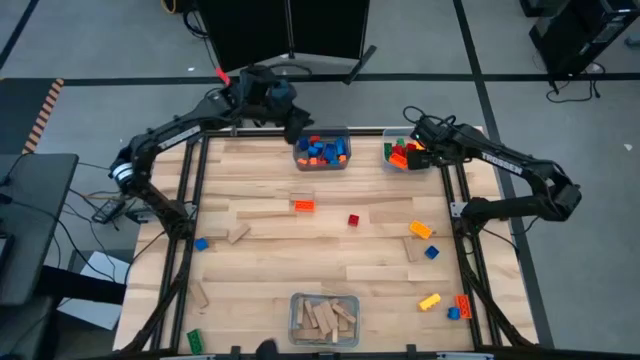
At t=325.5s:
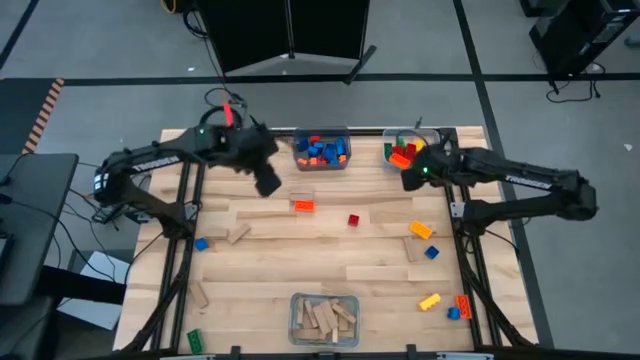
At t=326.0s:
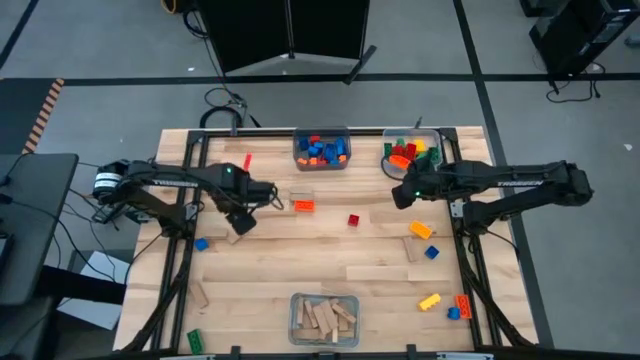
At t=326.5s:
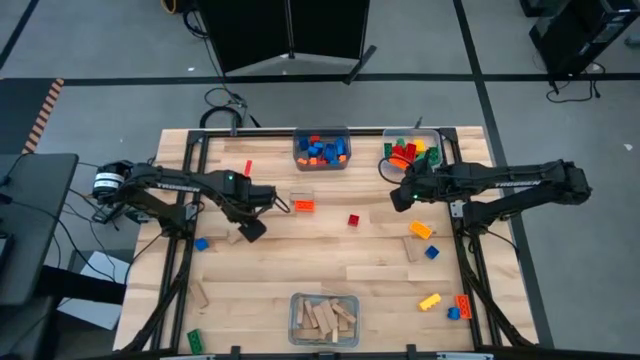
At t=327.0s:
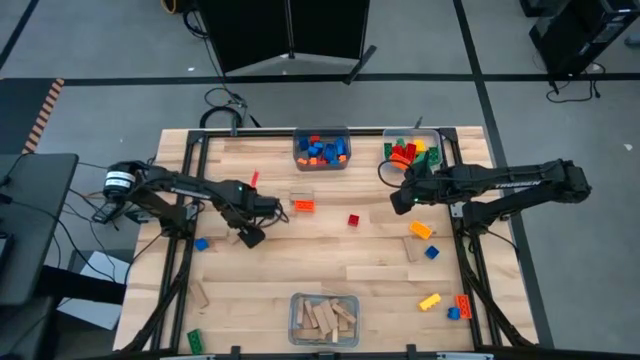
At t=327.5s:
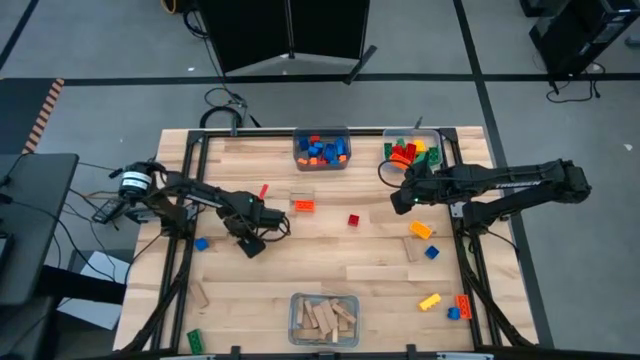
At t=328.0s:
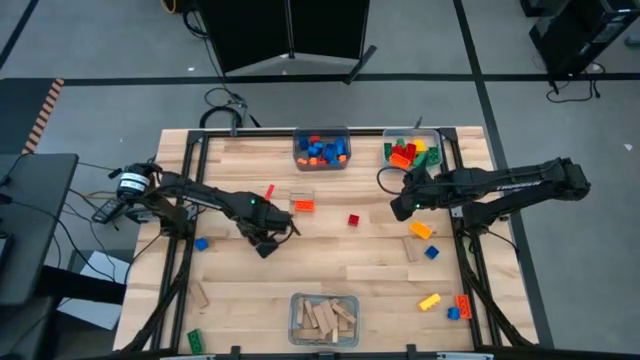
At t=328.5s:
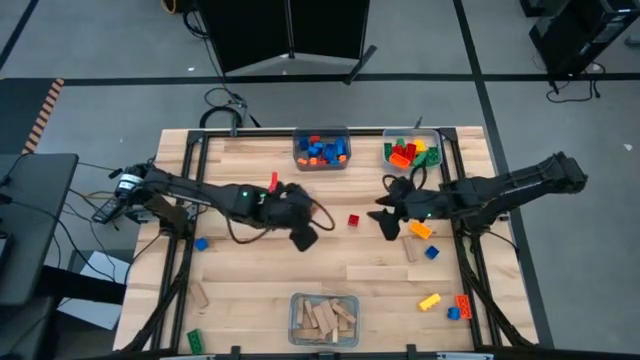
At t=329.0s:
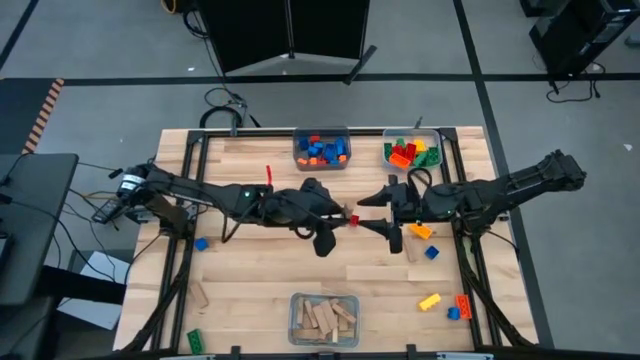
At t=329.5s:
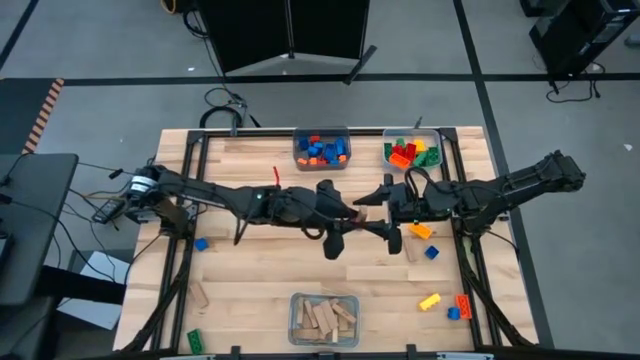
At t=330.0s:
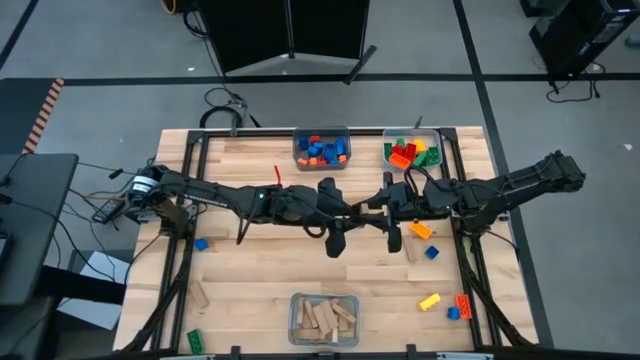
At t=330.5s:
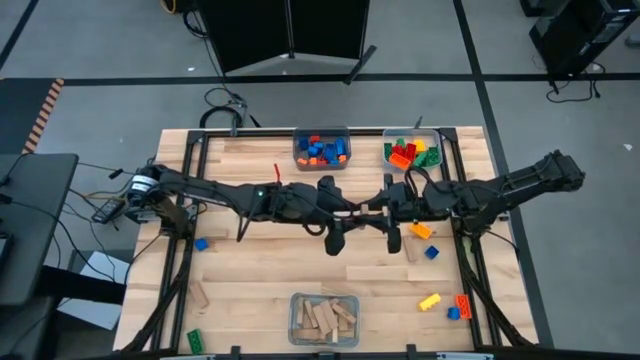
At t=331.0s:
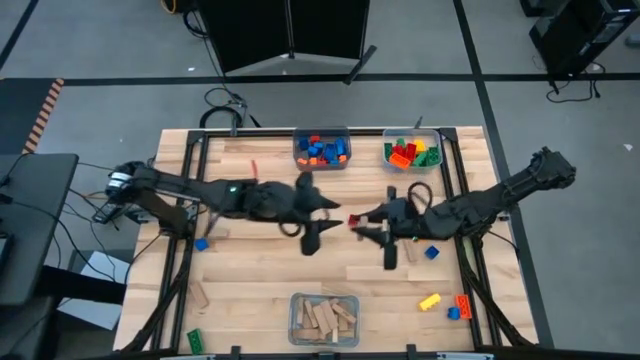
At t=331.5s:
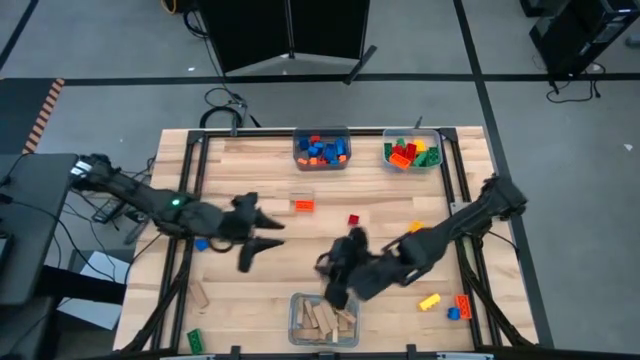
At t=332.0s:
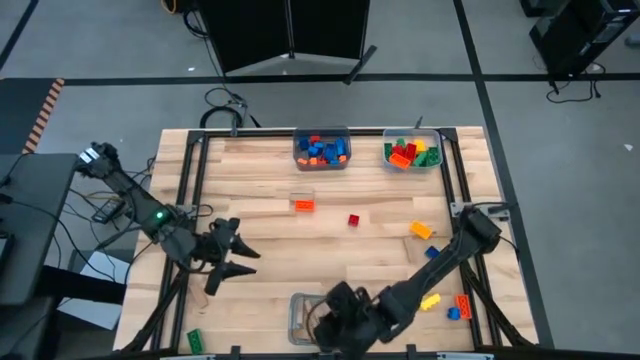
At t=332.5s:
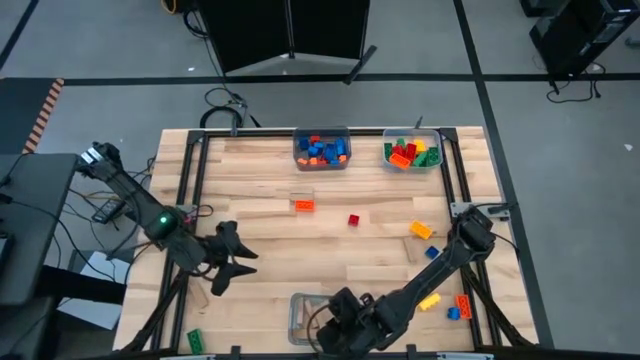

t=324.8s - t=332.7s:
Task: Sort blocks by size
Put the brown block into the gray bin

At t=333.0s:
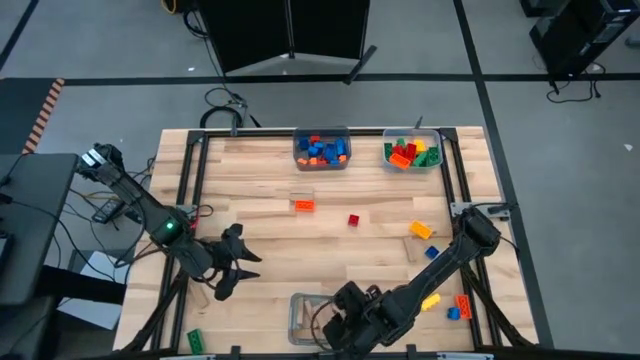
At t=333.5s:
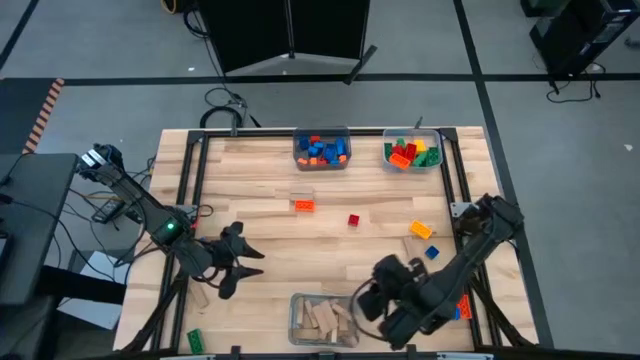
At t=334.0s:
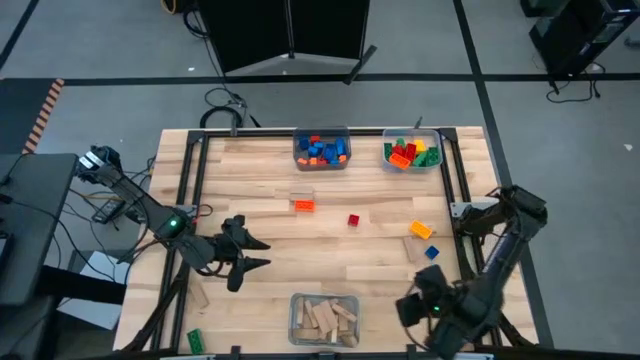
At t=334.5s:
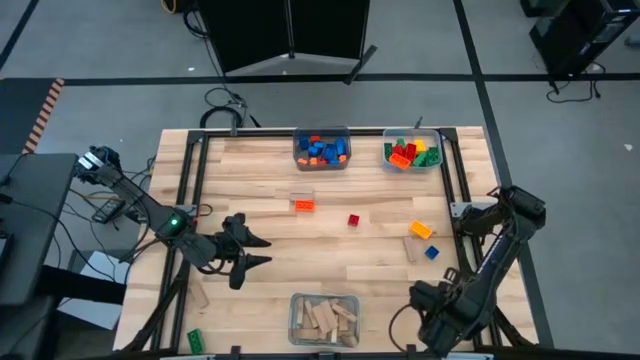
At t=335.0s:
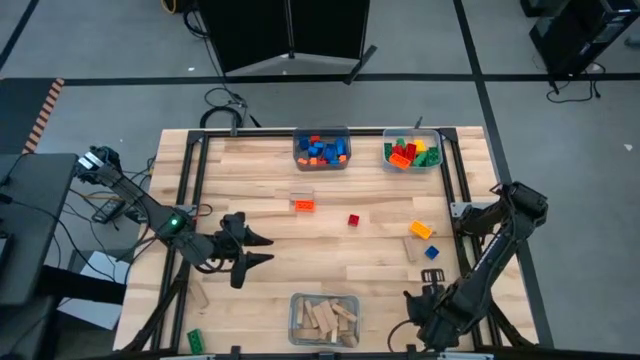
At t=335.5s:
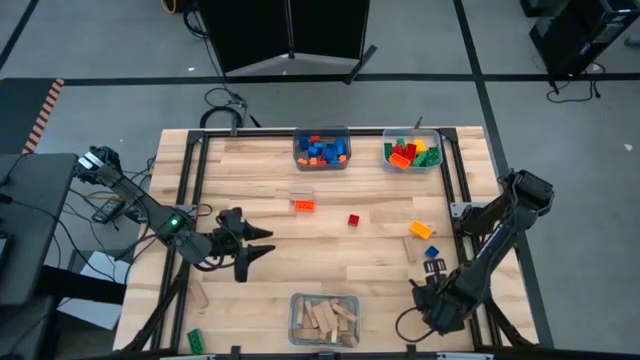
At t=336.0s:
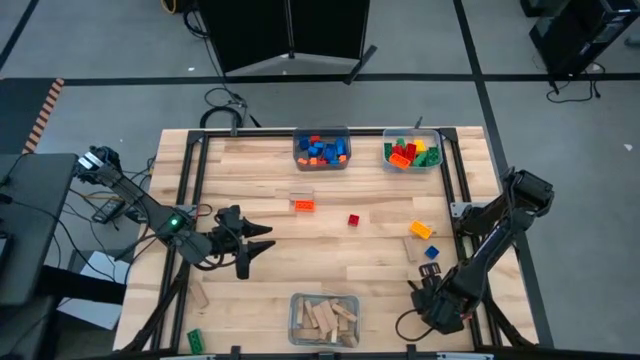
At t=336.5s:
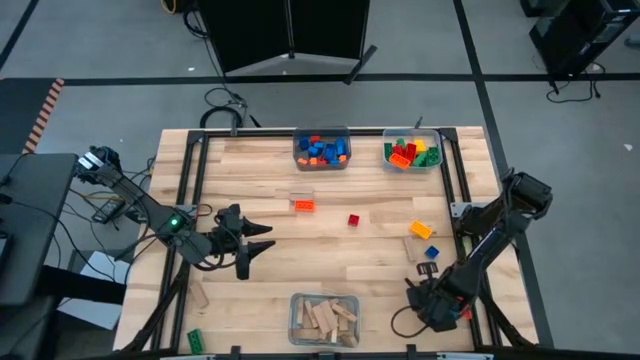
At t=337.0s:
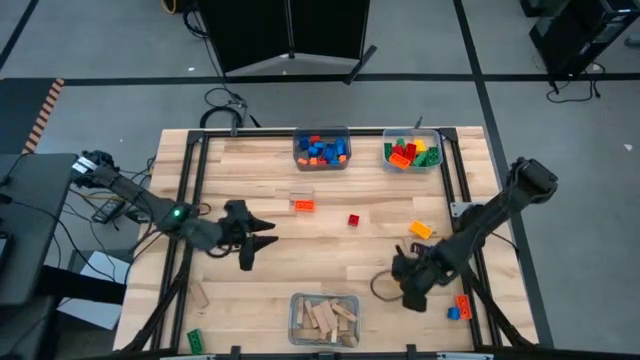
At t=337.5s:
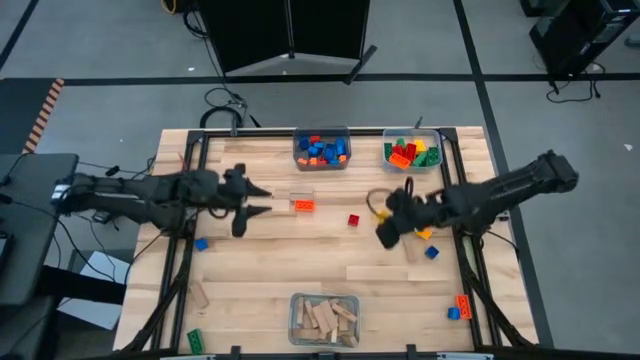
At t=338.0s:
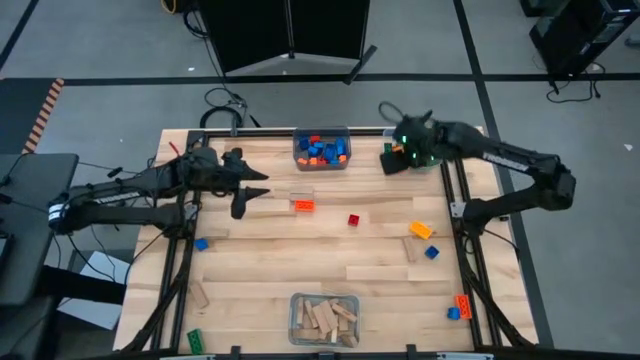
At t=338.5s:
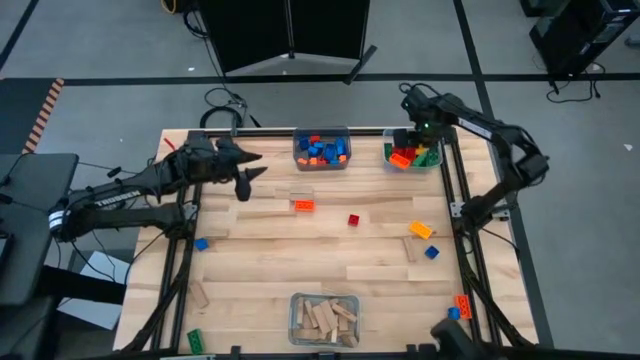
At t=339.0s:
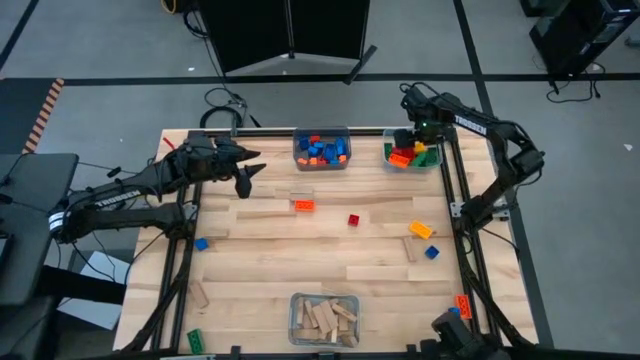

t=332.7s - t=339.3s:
Put the large yellow game piece into the transparent bin

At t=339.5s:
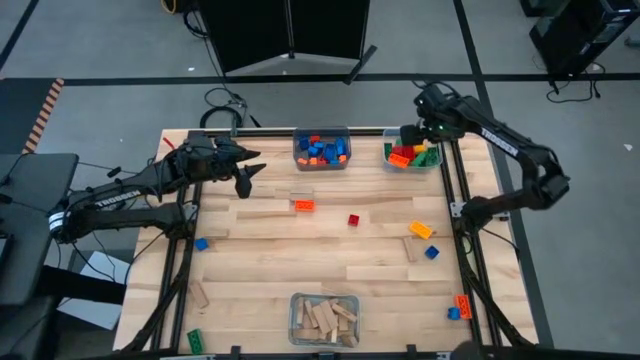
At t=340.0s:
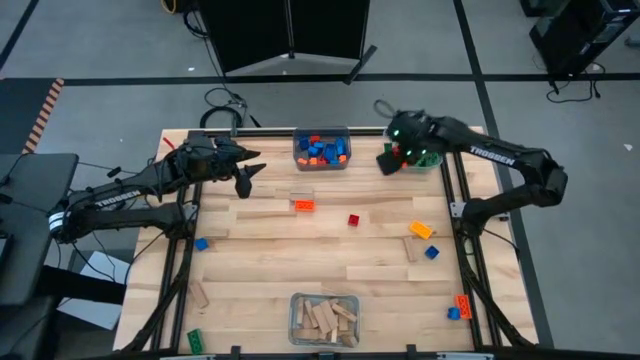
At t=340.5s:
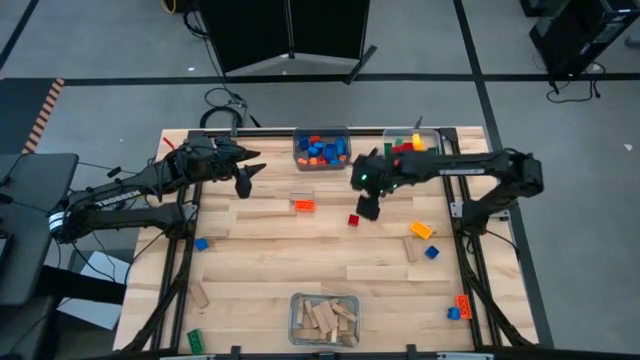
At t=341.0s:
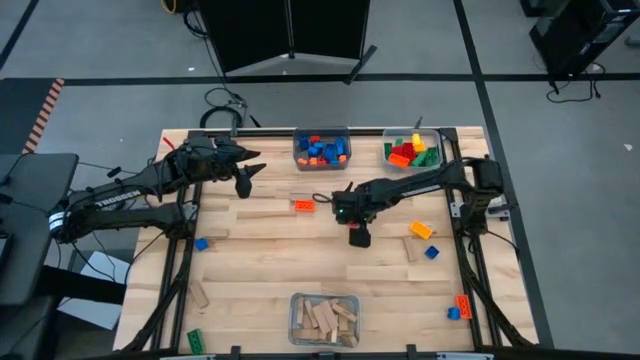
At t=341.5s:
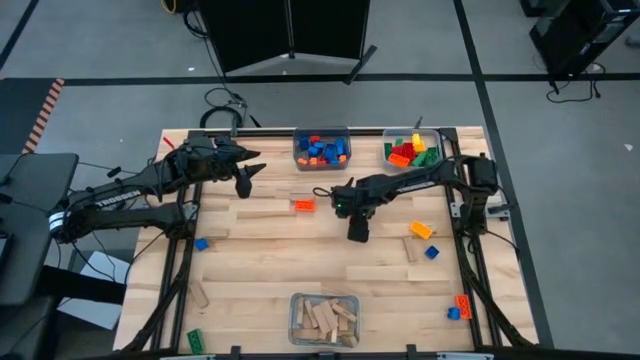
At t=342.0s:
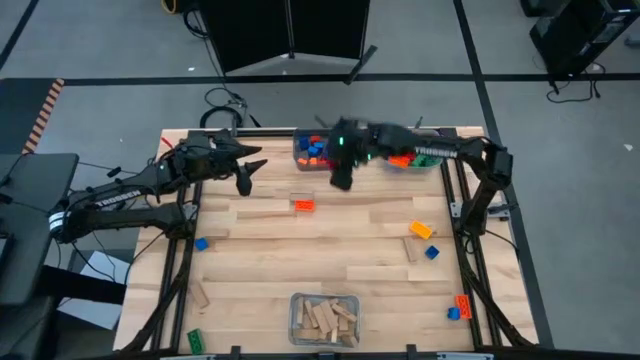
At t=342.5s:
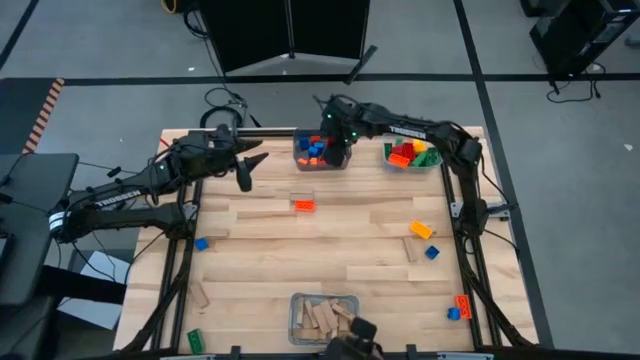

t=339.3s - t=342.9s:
Put the small red game piece into the black bin

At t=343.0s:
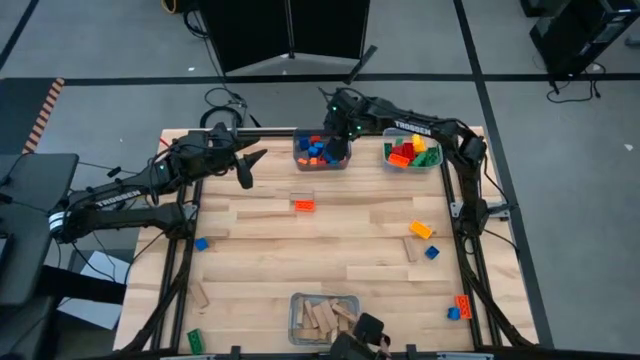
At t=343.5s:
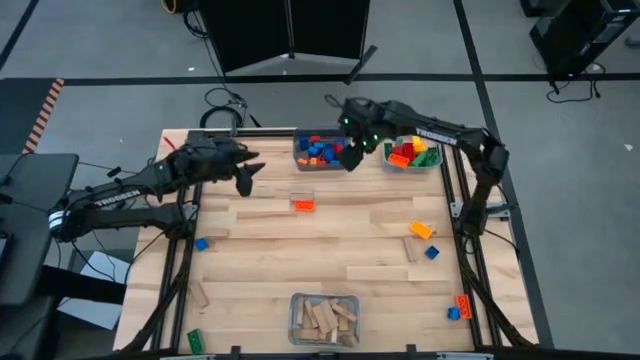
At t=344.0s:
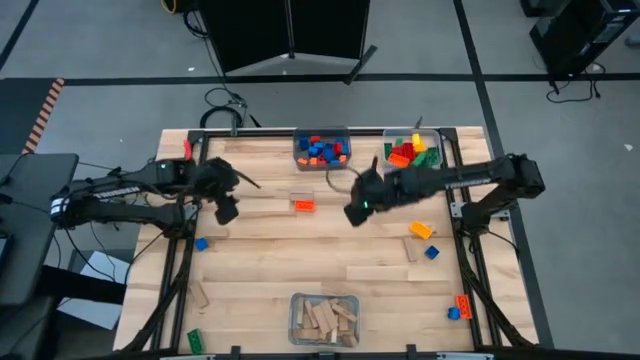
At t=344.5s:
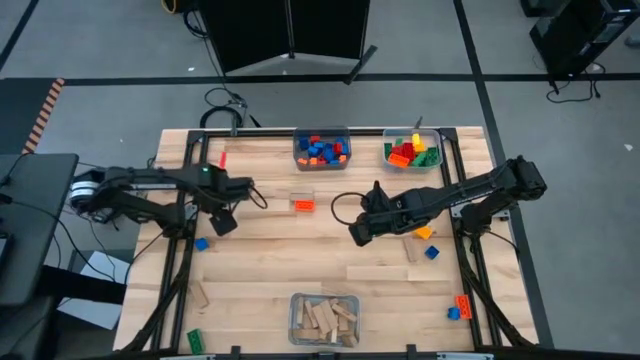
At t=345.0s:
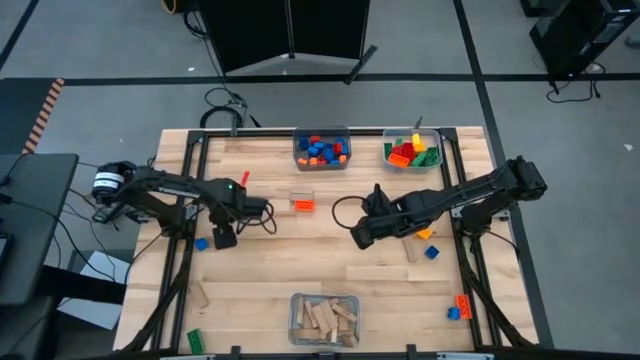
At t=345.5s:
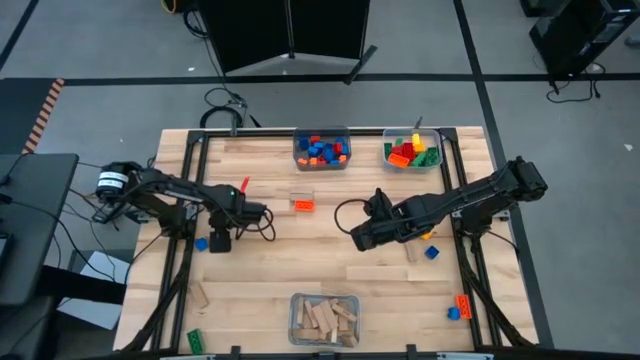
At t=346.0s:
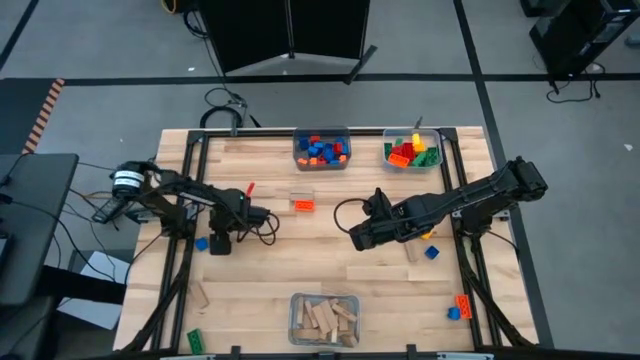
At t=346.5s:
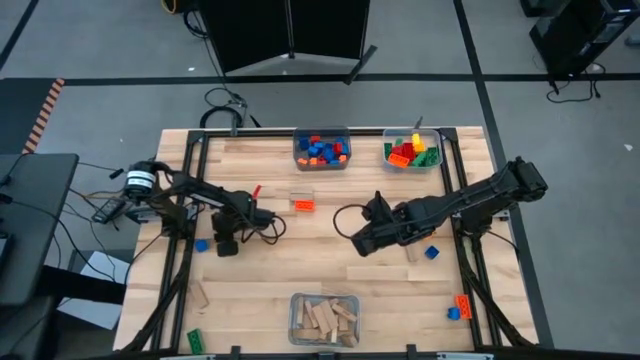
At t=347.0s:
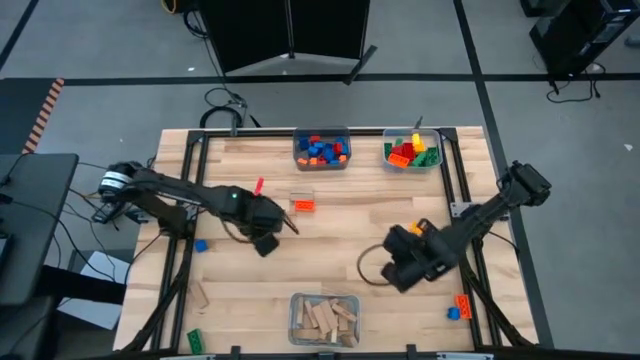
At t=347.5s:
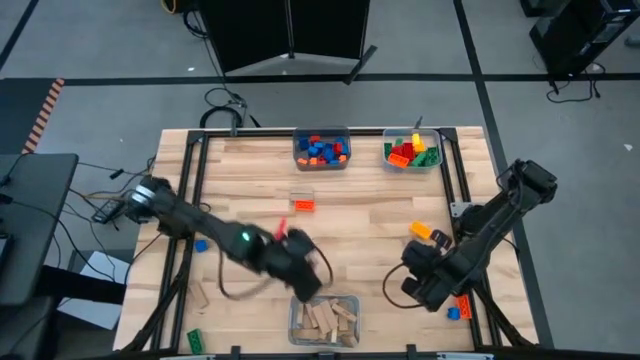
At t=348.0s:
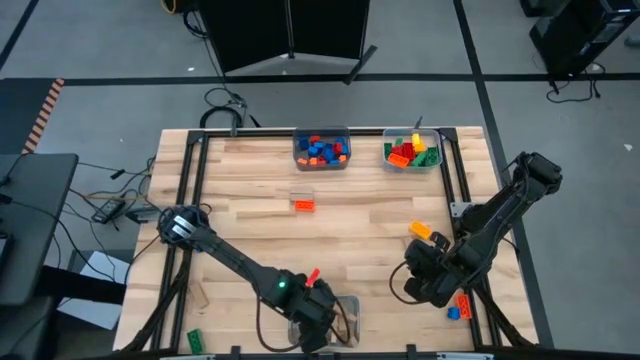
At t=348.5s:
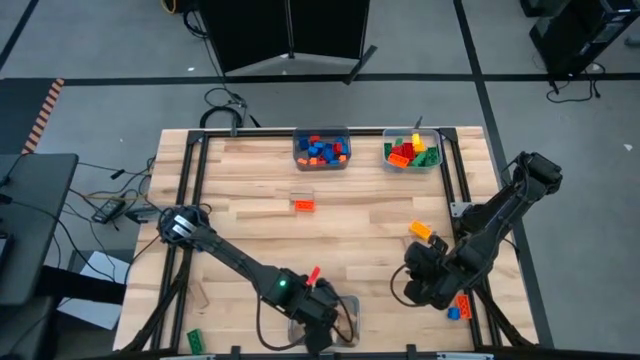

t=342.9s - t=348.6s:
Put the brown block into the gray bin
